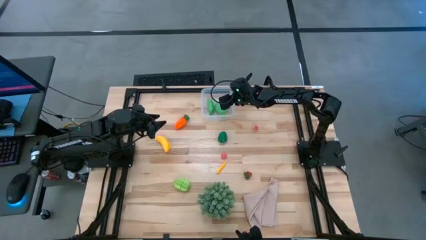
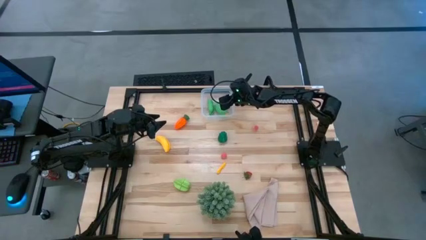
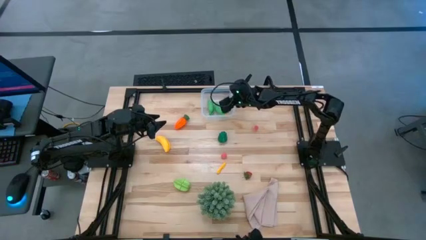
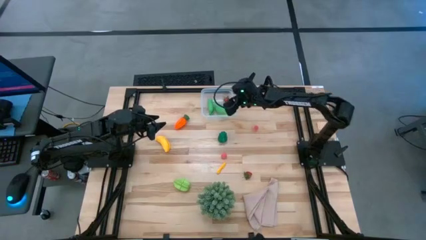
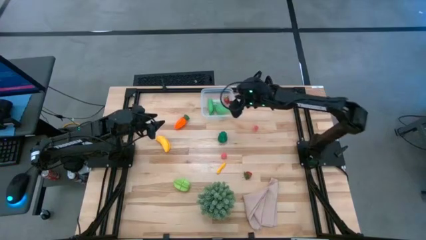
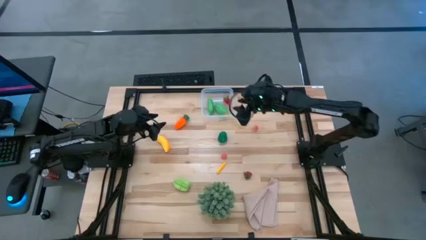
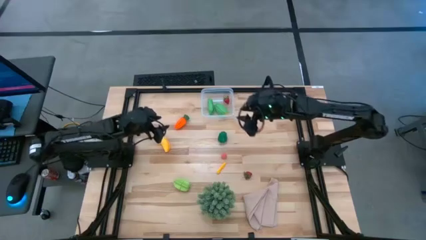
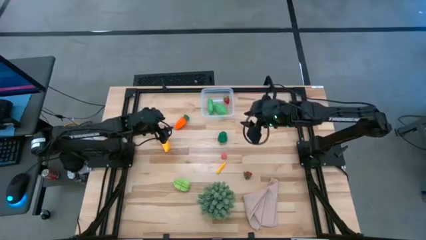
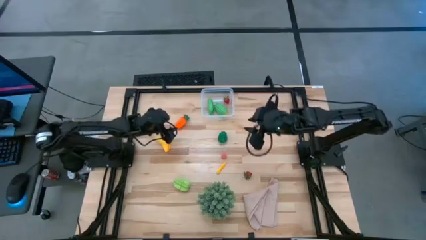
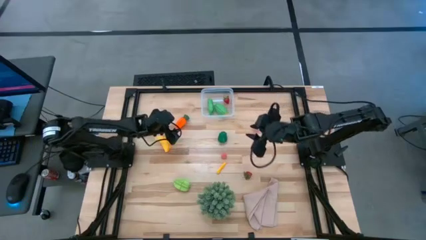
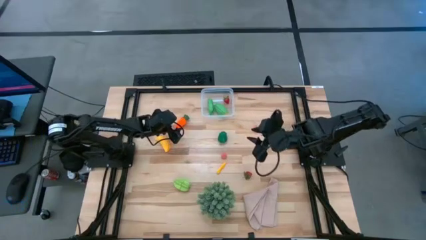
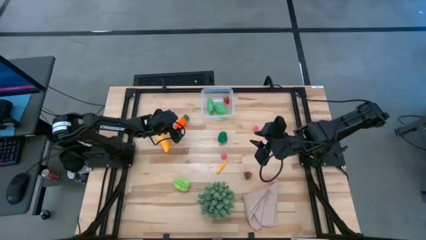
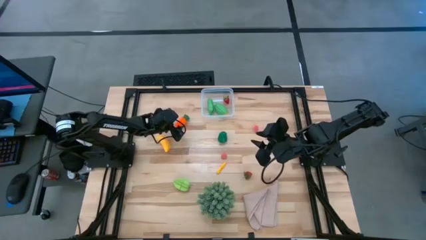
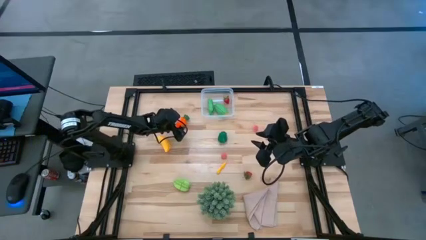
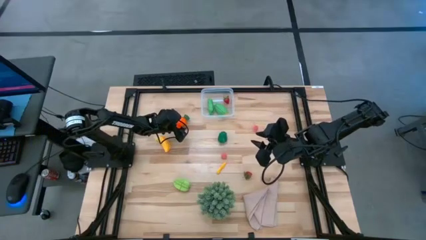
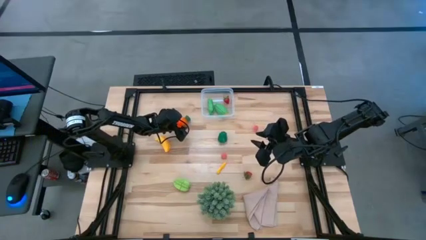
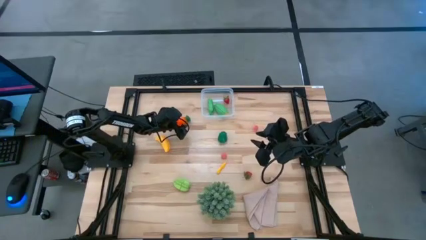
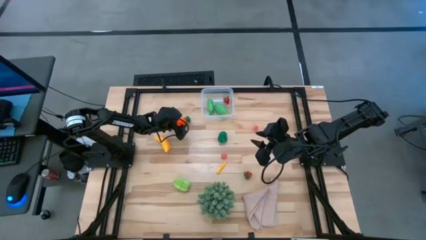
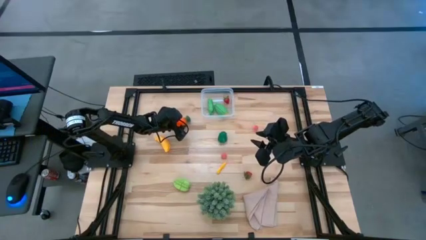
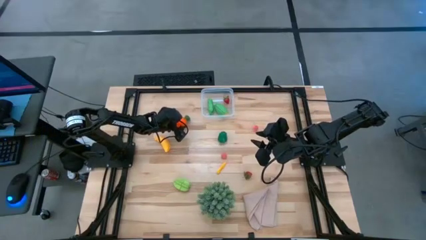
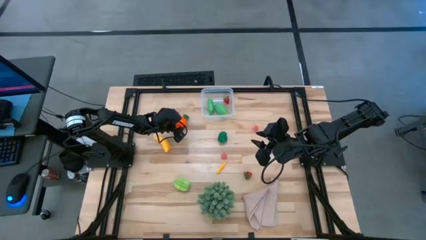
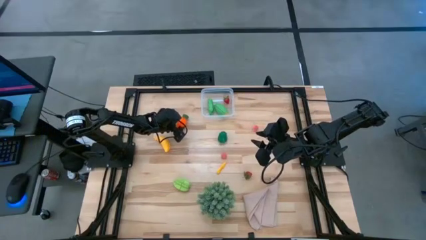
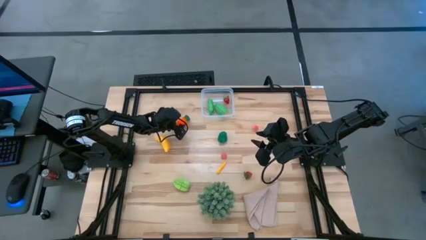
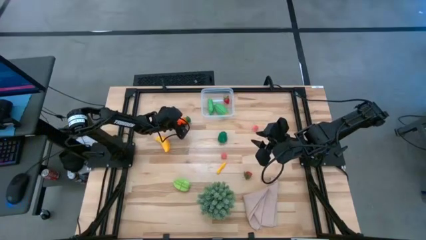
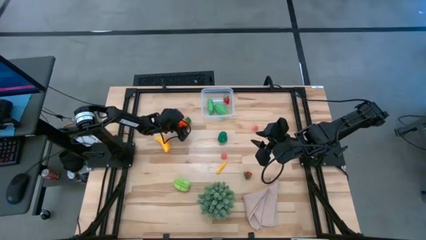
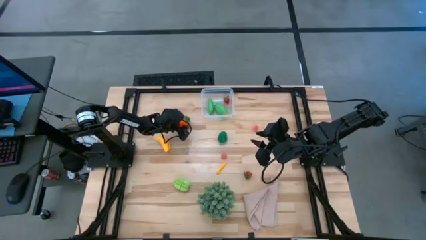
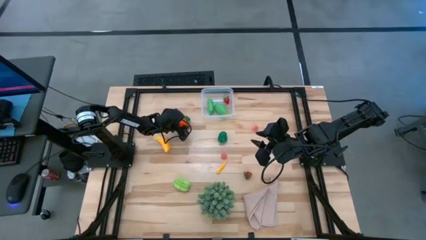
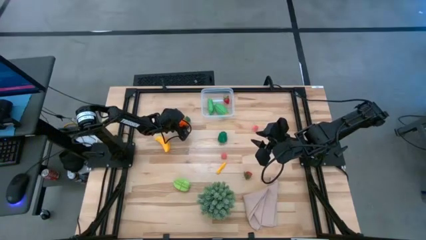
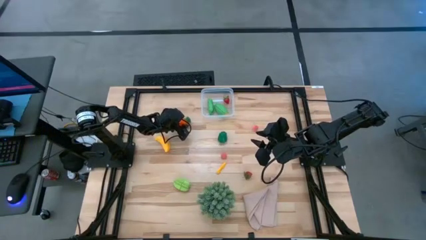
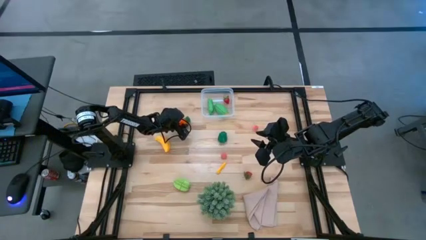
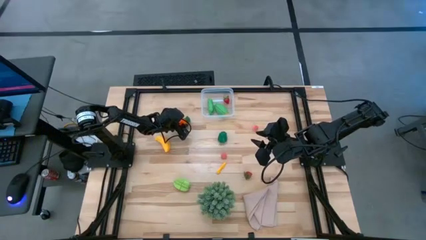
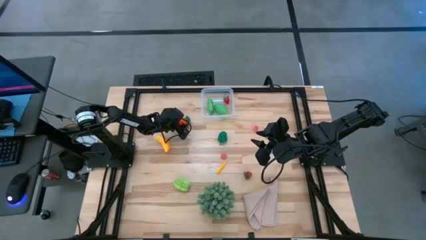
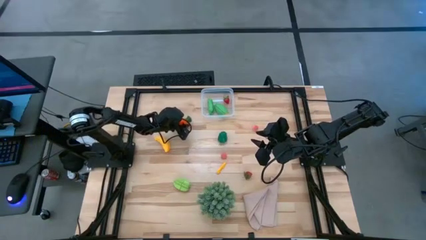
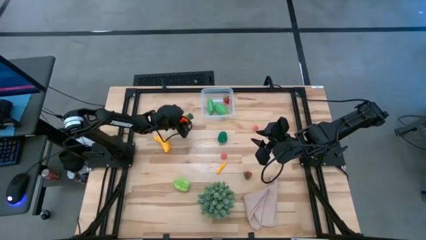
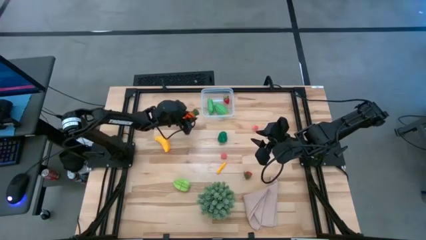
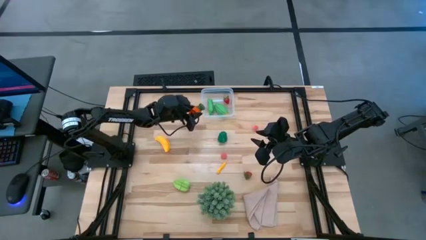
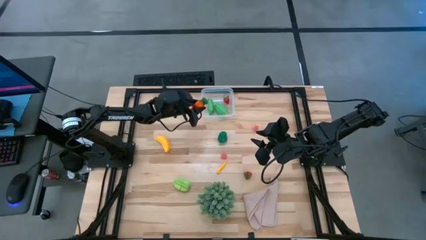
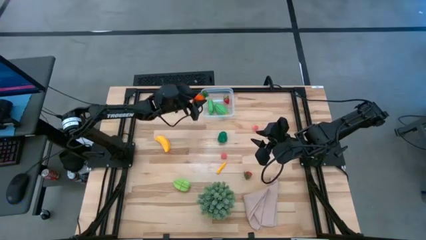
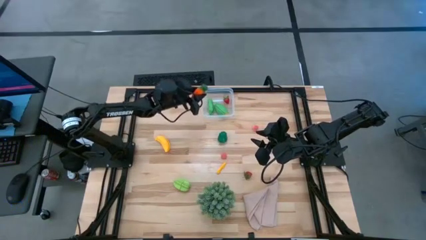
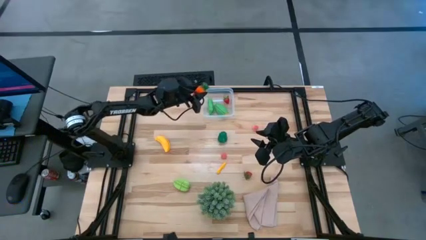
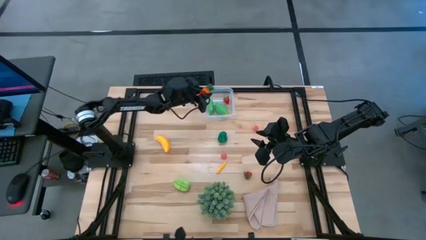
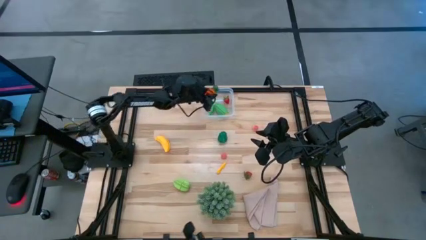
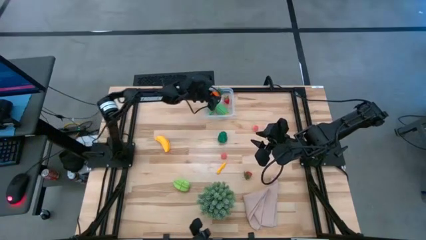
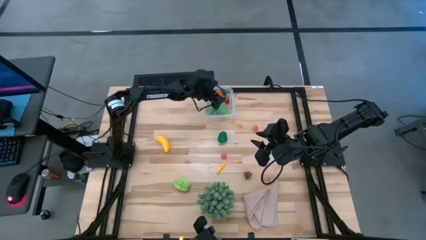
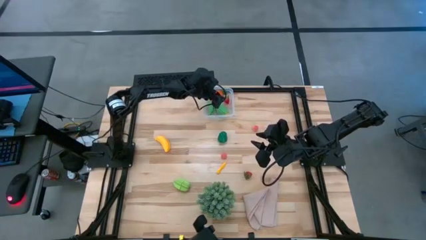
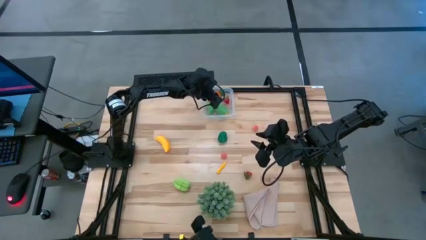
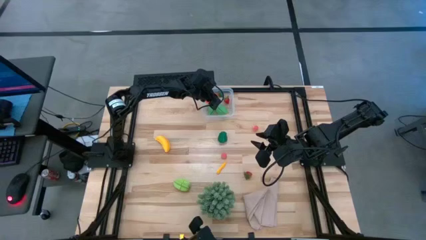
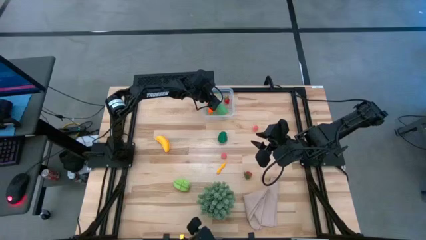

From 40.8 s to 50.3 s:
Task: Pick and placing Produce into tupperware
Put the carrot into the transparent bin

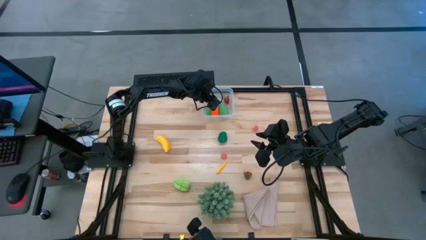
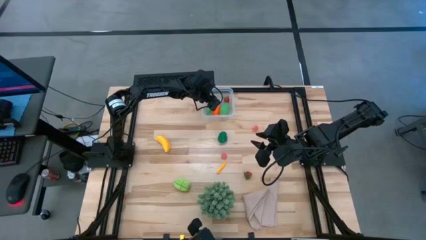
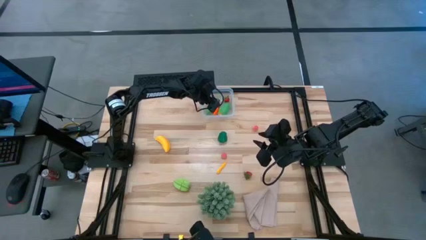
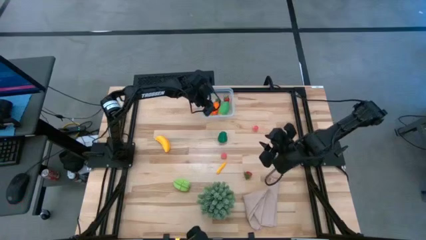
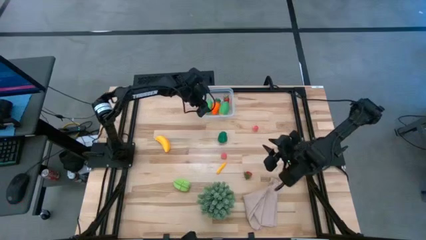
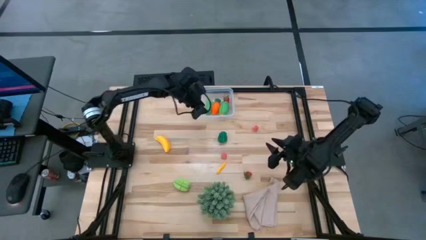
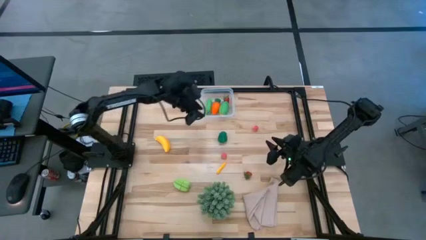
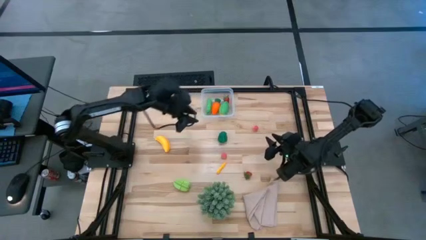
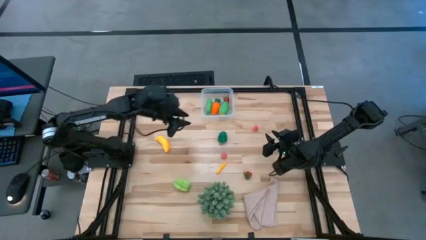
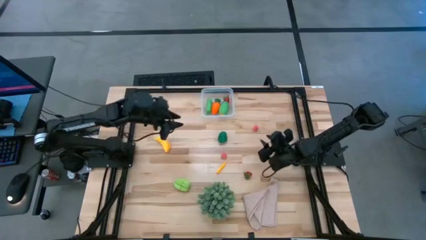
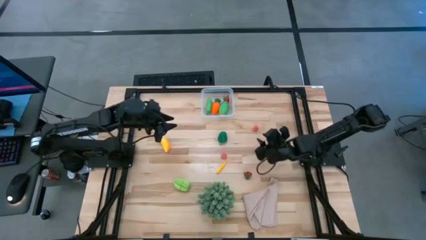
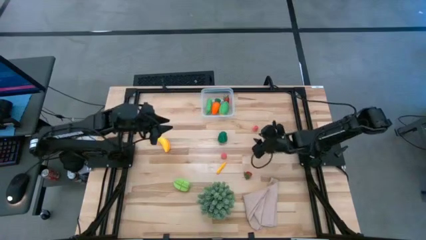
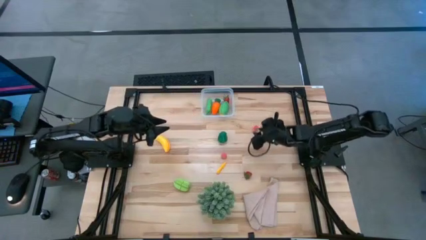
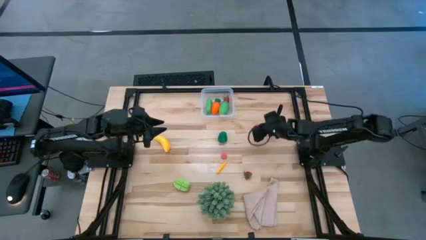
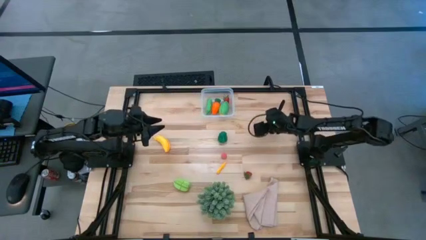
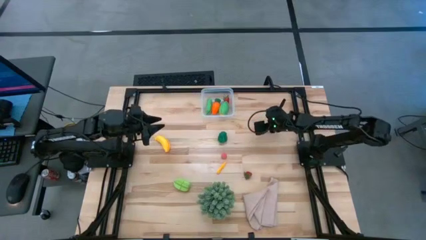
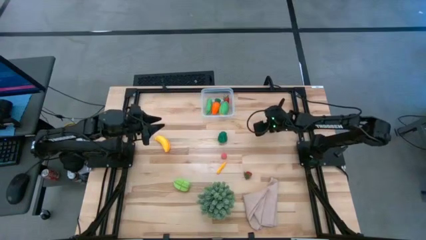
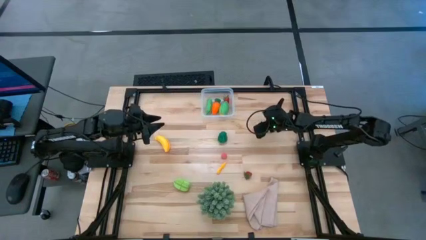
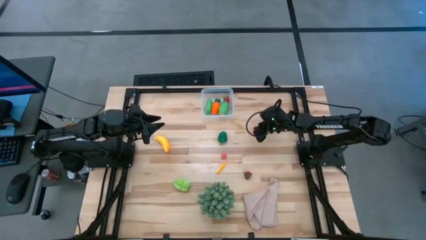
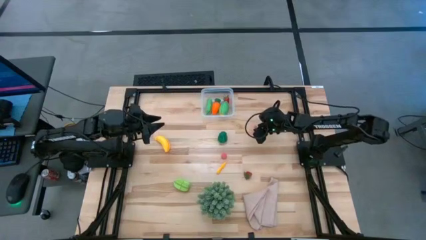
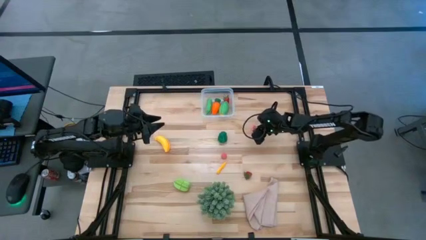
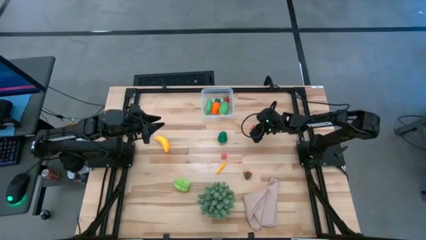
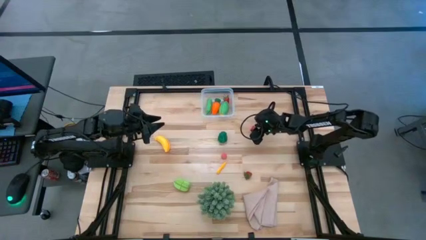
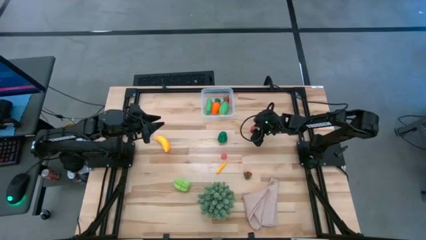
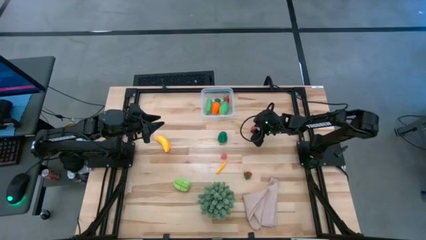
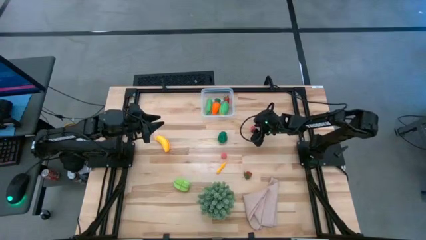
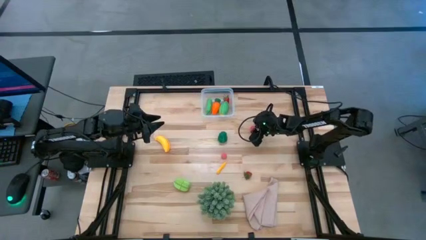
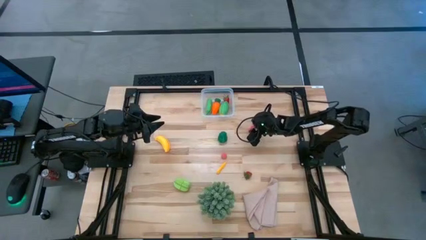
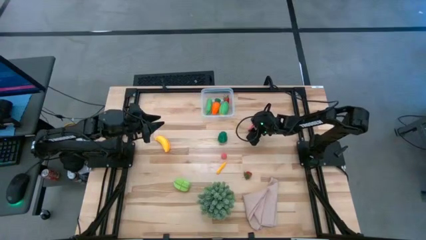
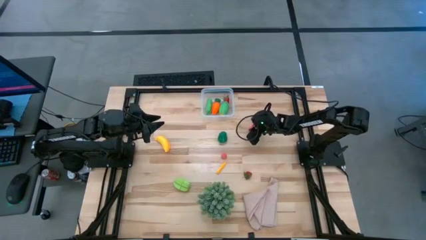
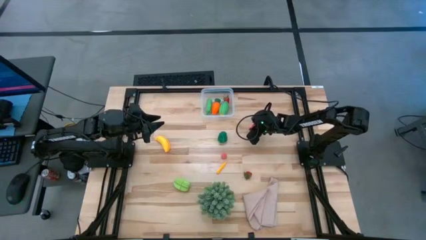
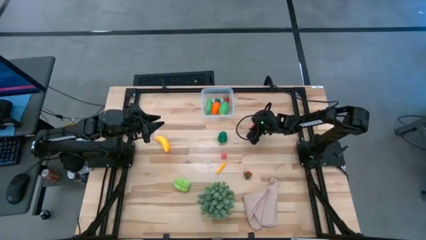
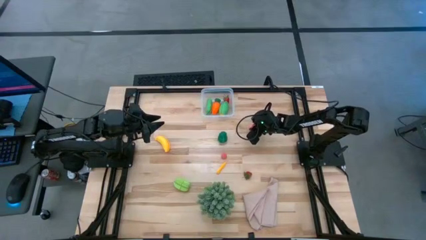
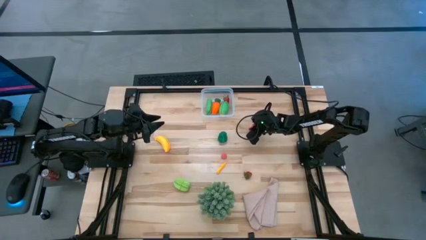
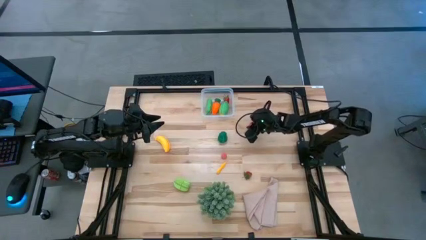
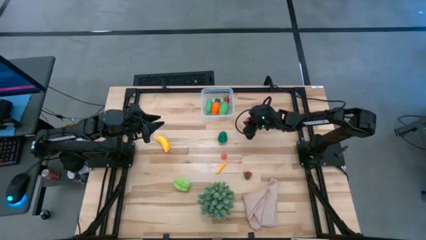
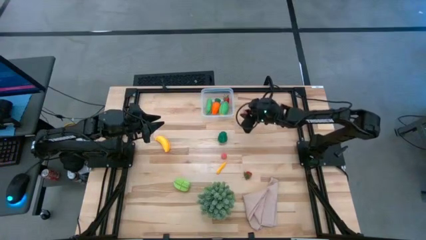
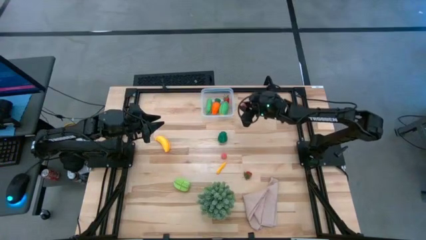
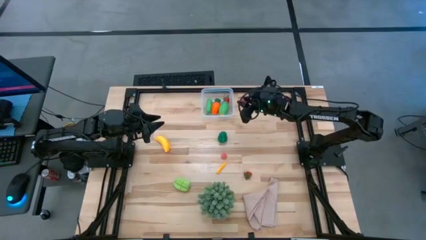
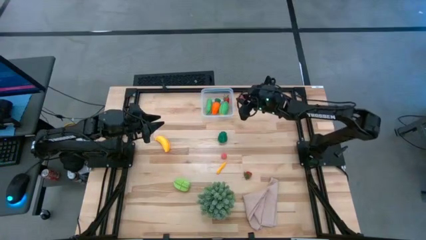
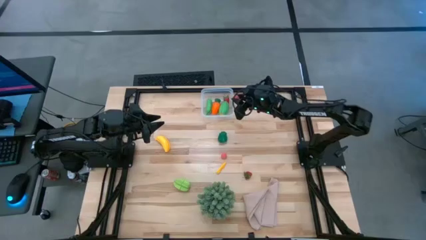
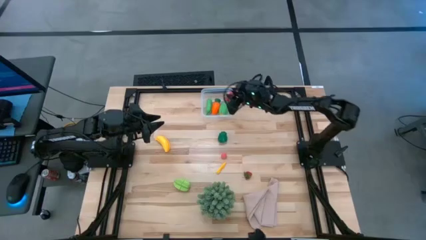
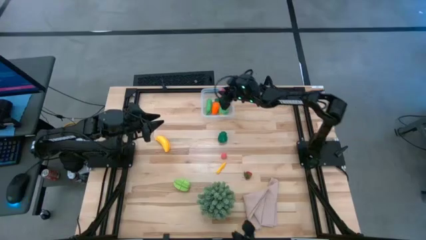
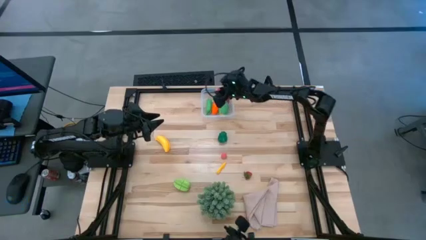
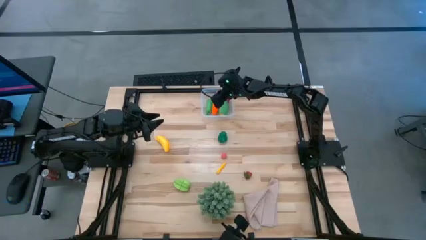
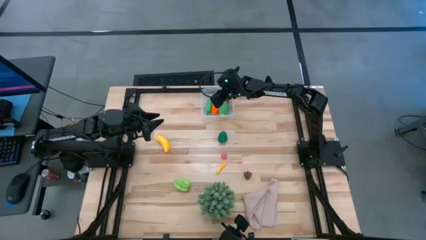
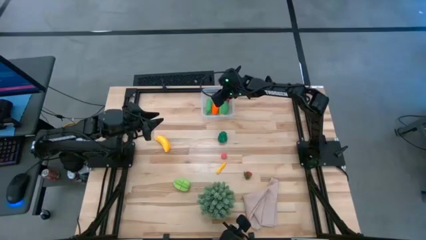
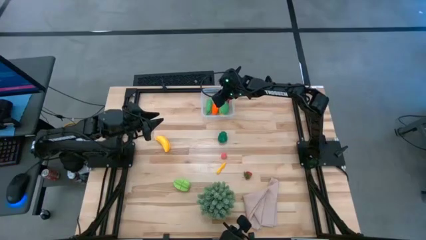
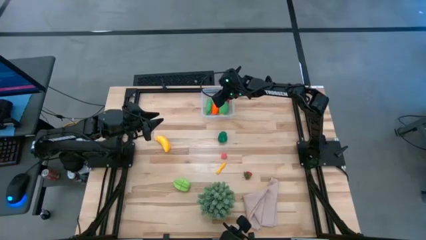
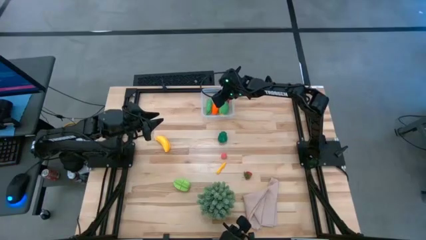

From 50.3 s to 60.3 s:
Put the top peach into the transparent bin
